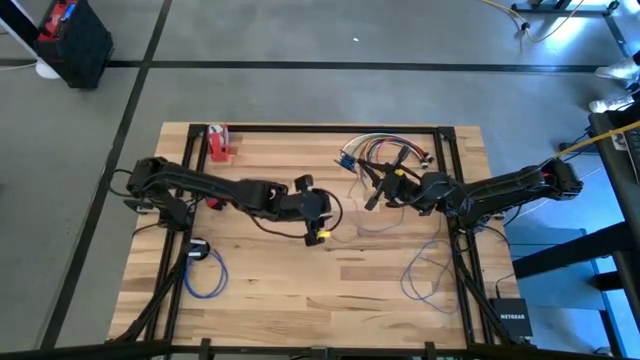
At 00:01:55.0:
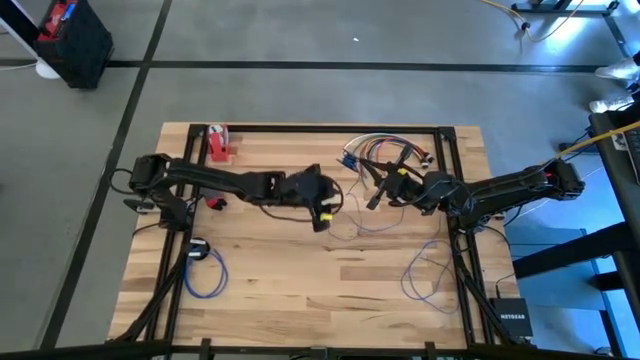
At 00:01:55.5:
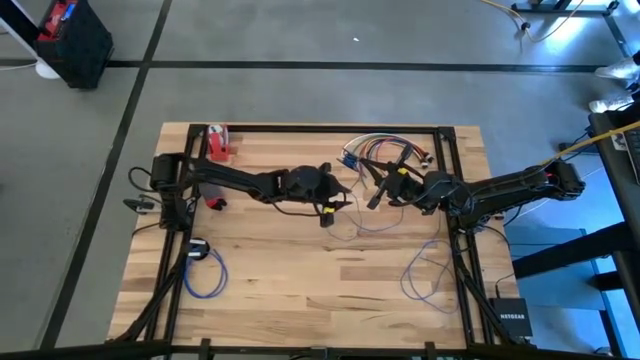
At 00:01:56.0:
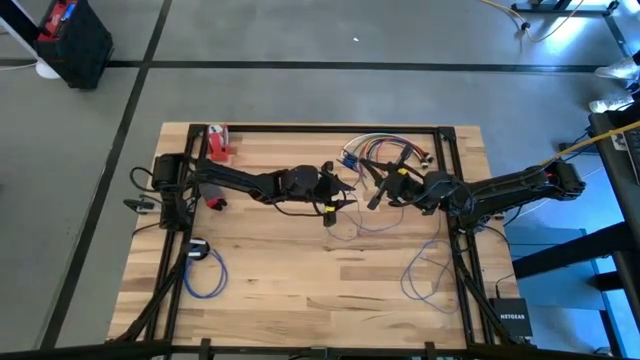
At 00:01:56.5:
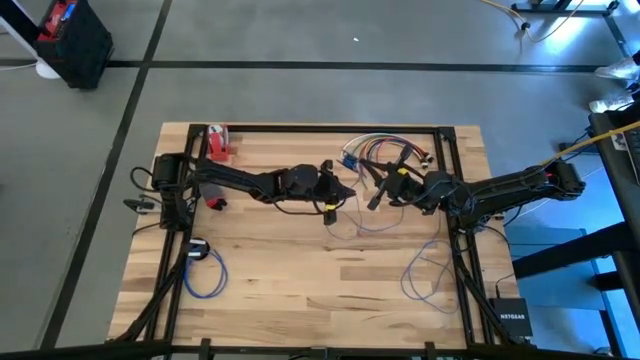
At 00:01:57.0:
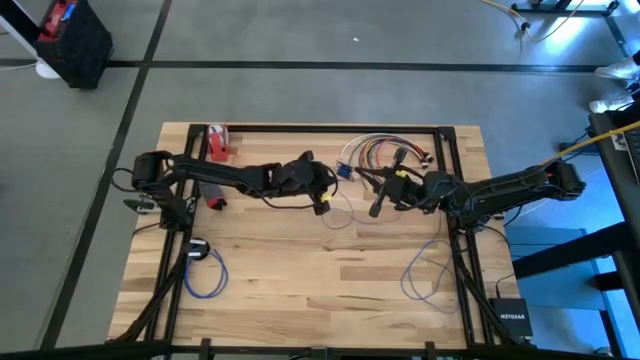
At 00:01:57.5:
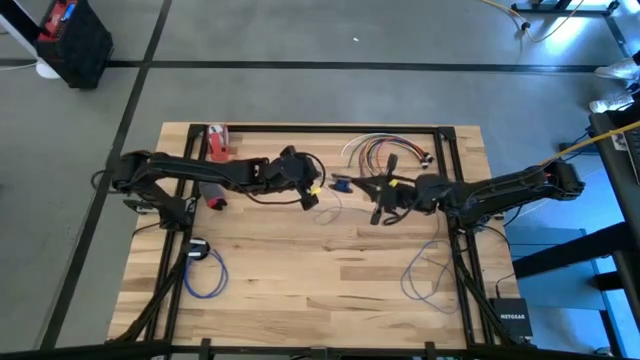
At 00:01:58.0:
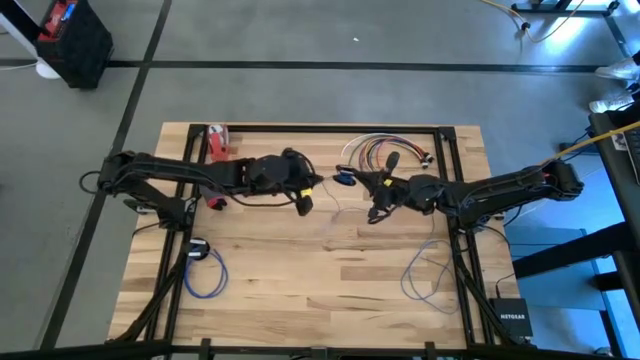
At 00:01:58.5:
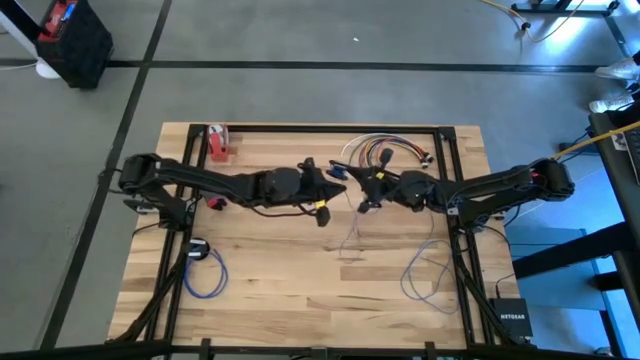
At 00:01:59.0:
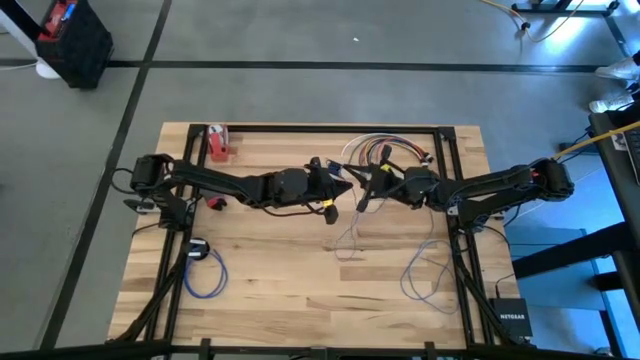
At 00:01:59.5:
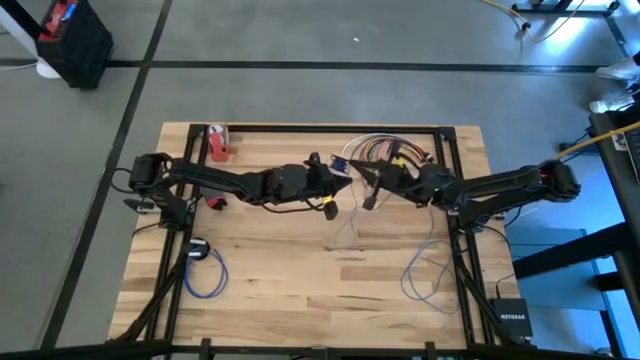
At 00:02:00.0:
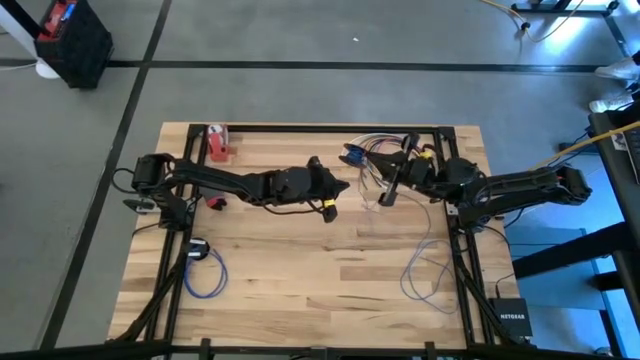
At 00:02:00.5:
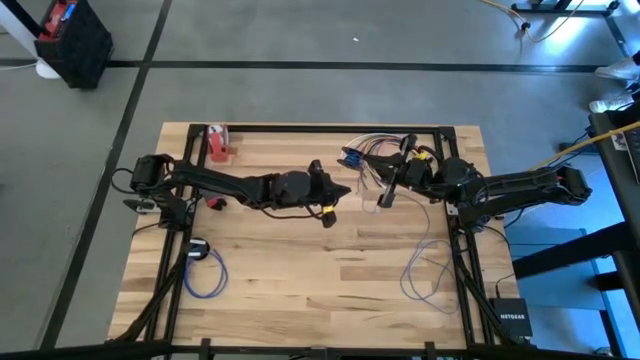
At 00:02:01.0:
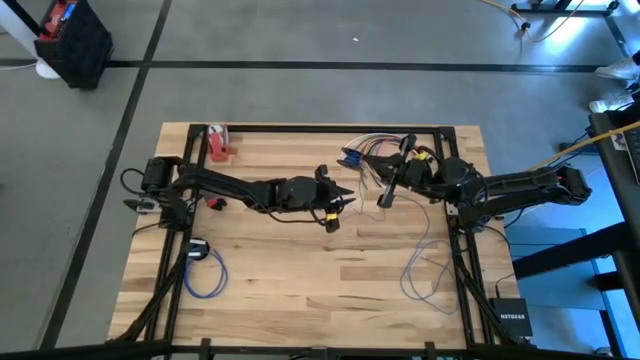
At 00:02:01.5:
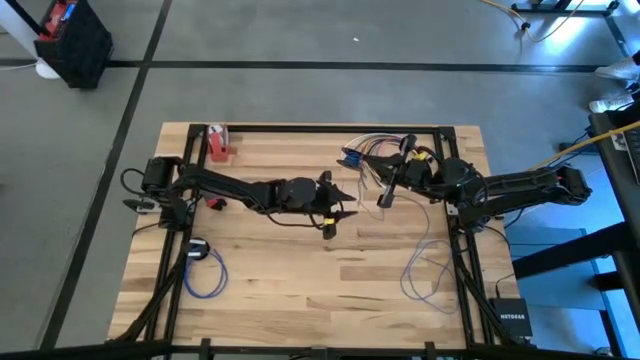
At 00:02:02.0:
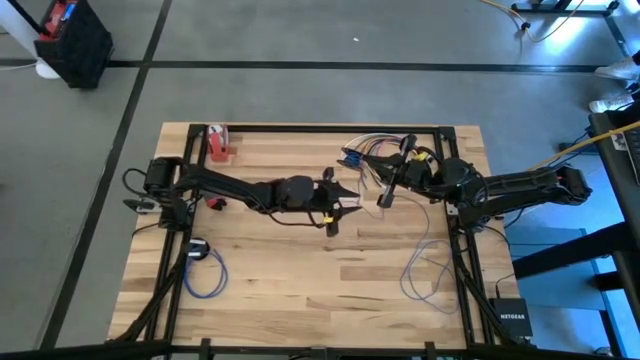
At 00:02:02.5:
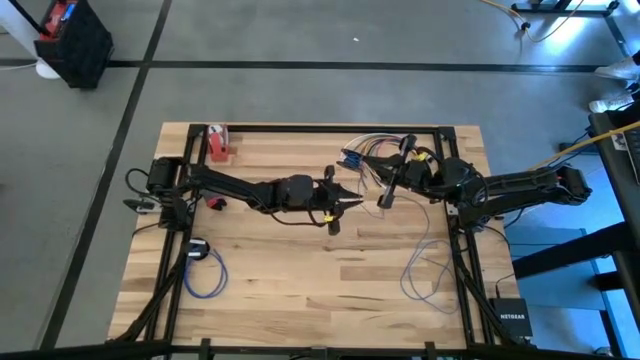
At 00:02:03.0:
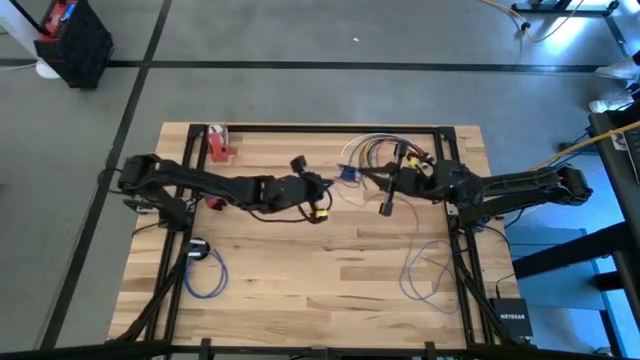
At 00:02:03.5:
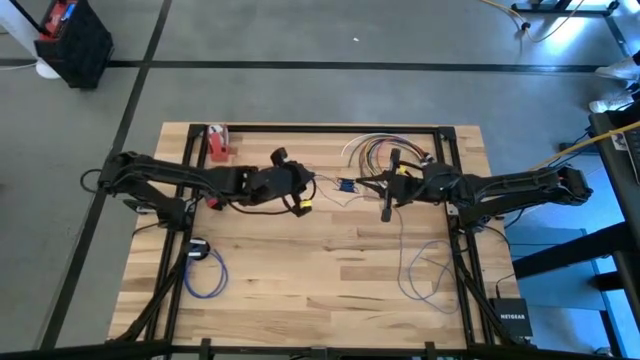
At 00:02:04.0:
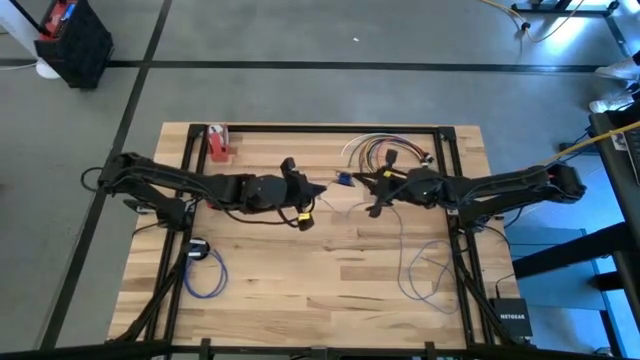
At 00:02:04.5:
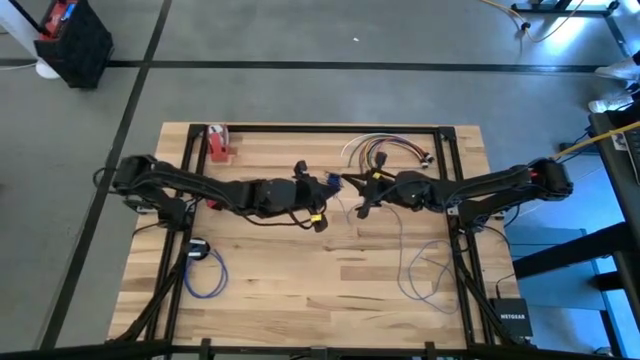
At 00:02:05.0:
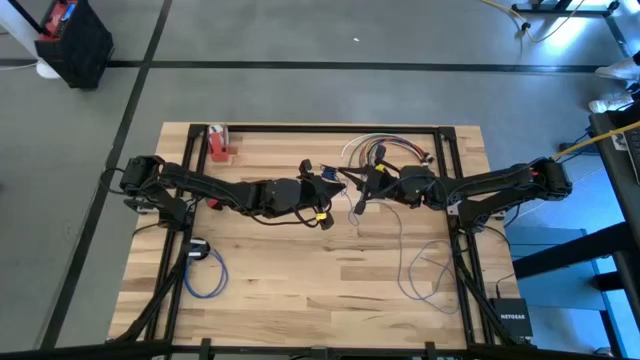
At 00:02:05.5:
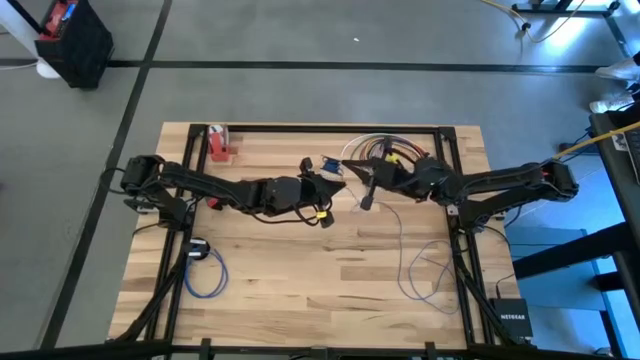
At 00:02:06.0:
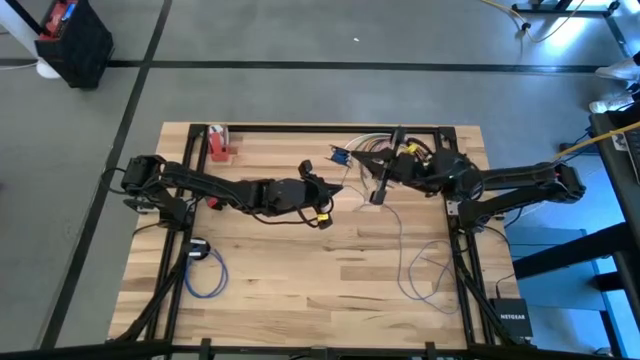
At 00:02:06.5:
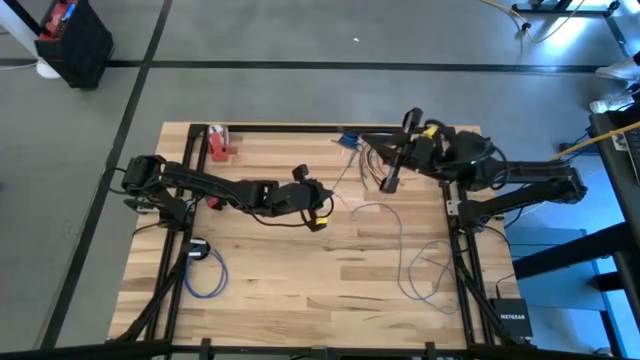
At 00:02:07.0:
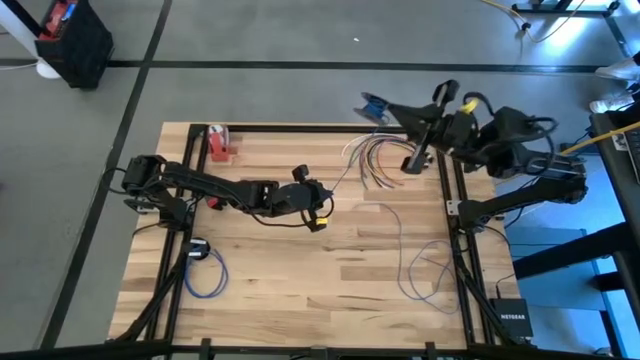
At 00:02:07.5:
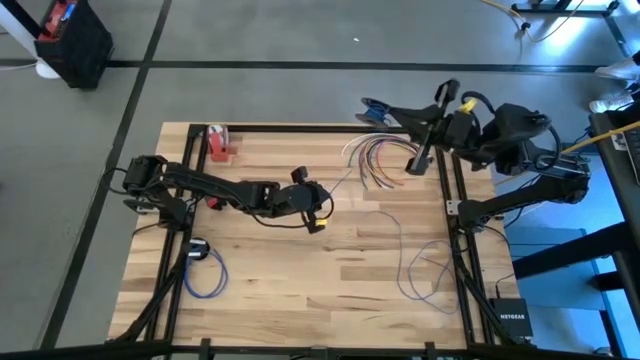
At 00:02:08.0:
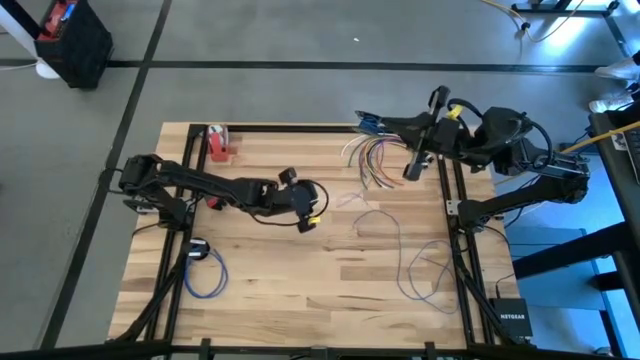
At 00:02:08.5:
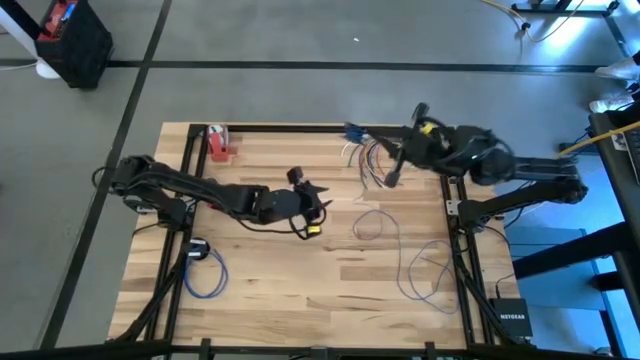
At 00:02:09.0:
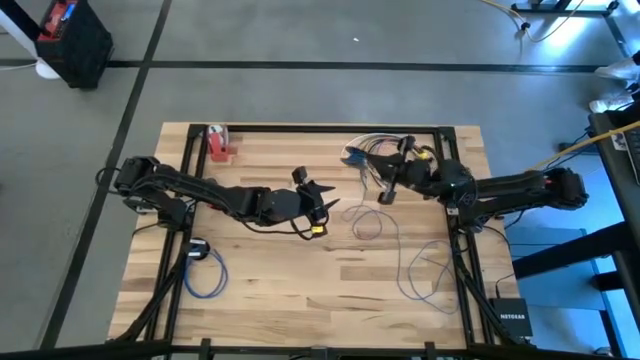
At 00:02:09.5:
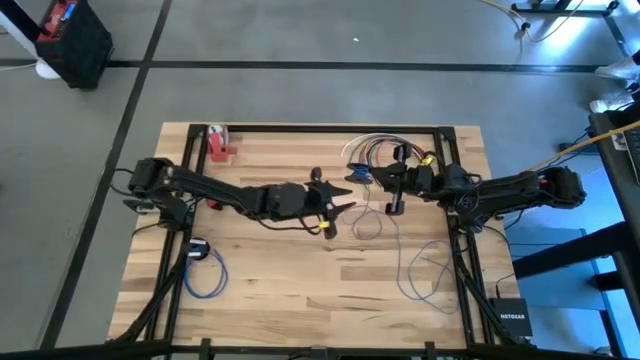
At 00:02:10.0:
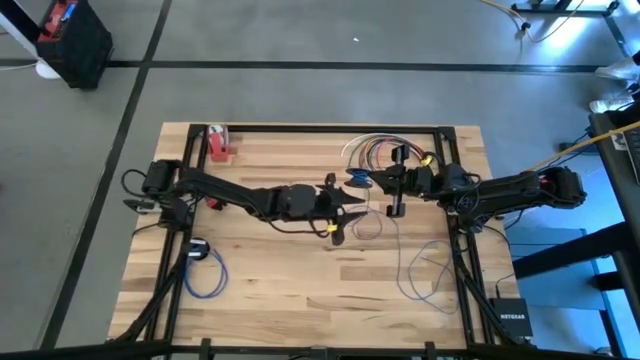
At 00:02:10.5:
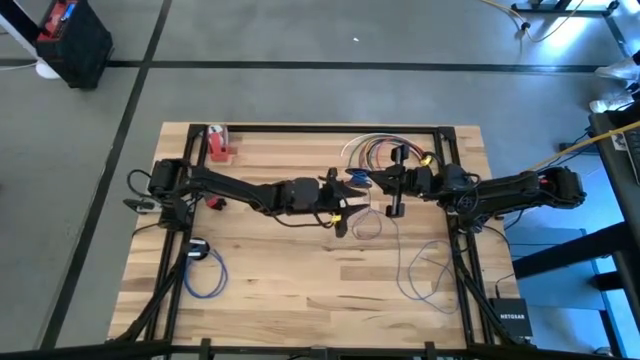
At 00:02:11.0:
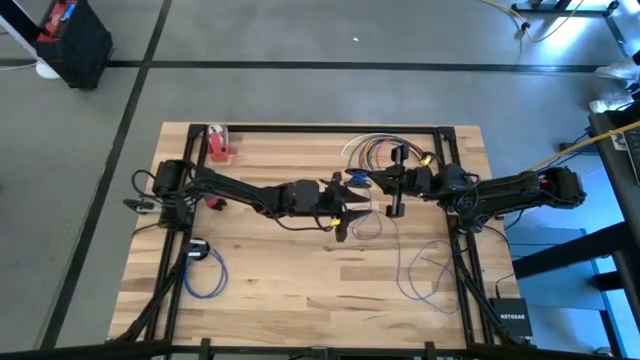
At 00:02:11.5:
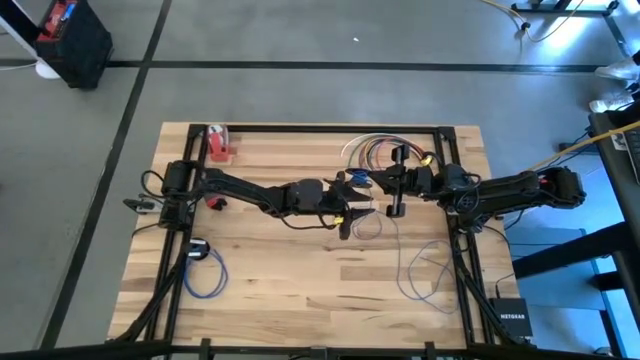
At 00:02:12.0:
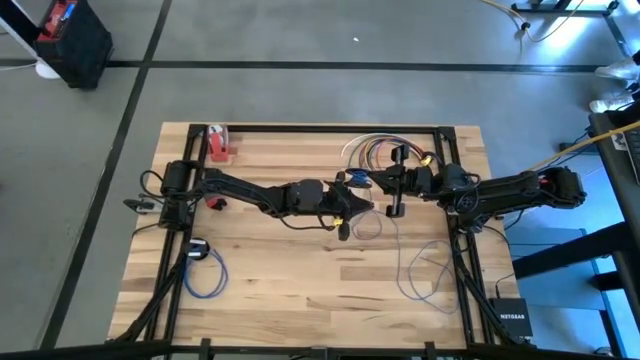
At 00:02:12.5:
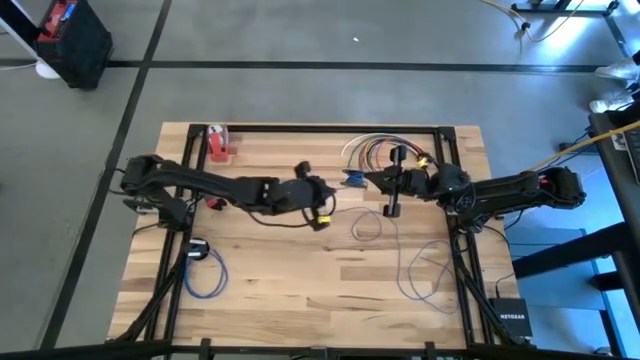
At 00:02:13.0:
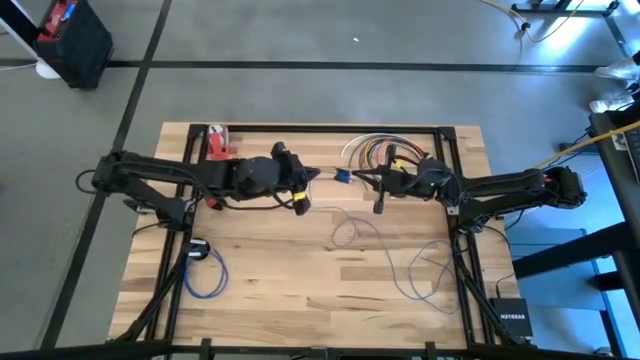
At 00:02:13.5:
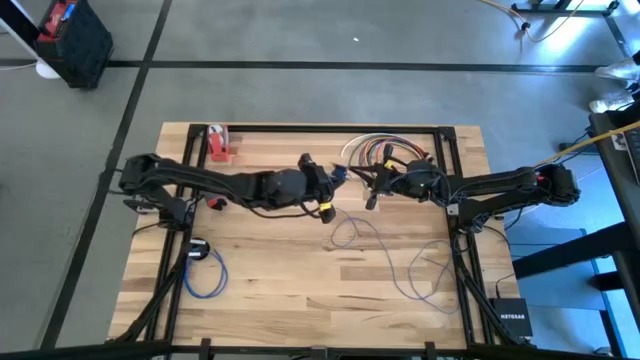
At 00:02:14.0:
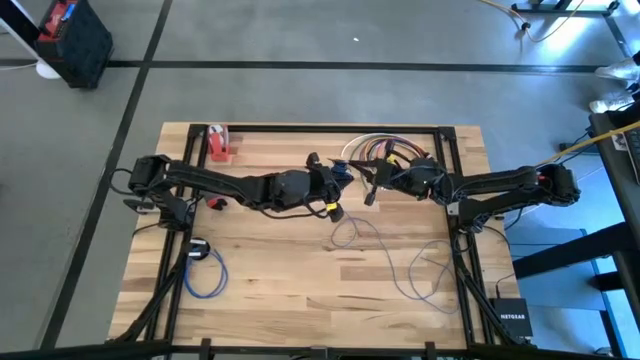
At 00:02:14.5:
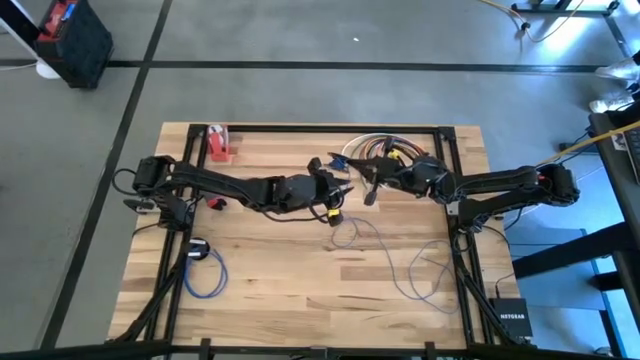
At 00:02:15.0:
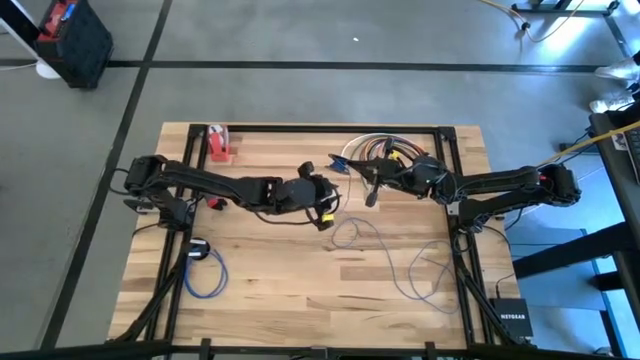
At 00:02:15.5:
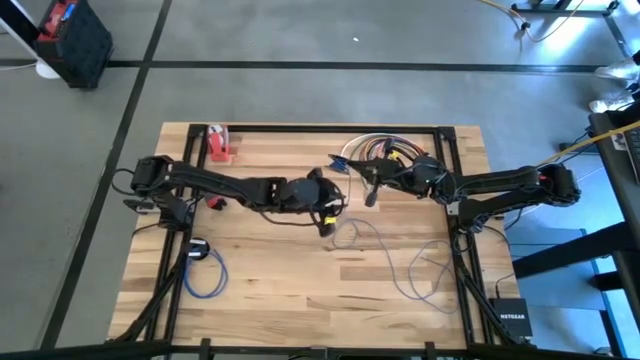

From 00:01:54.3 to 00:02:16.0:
Task: Coil cords
Coil the blue cable wire on the black spool
